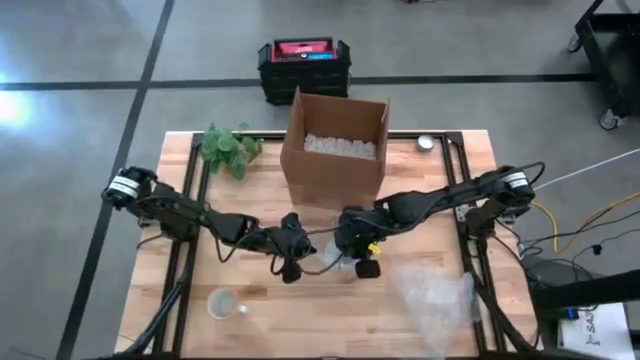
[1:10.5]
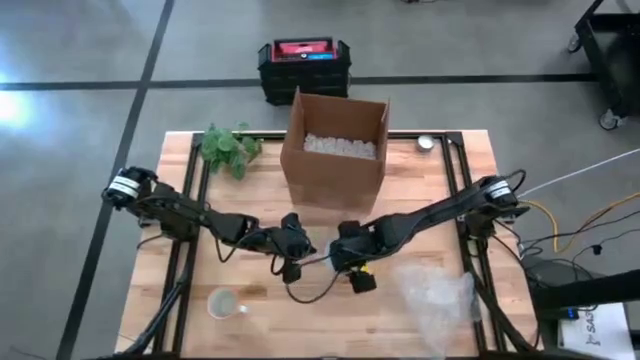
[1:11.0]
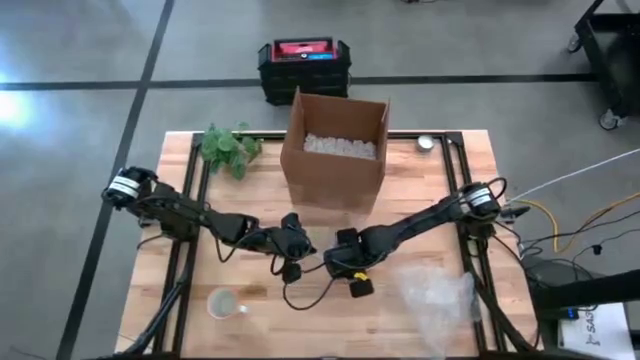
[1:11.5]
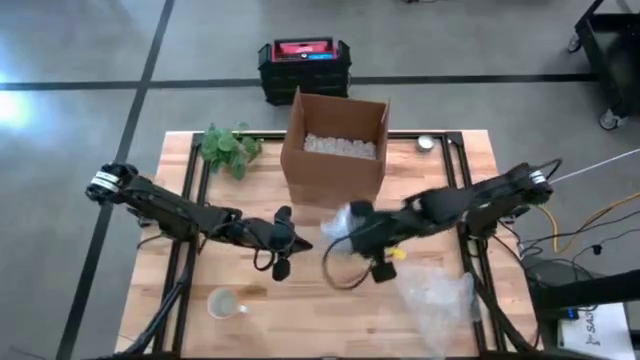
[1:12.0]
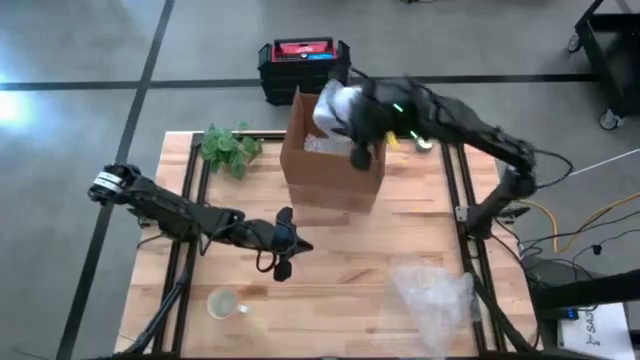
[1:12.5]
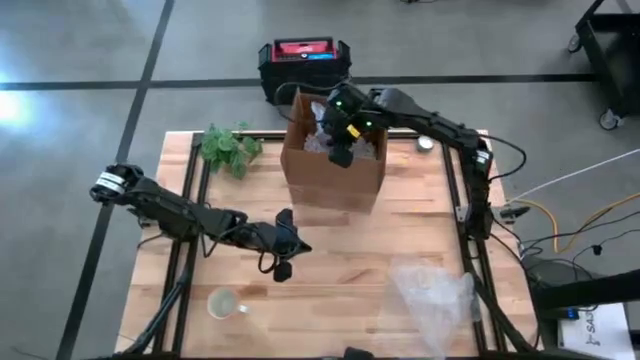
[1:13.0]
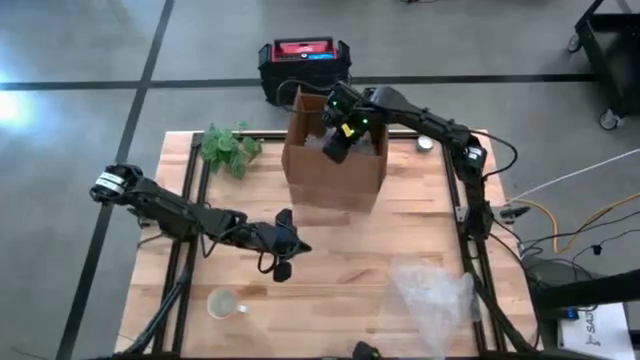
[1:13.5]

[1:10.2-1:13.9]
Task: wrap mug
Put the wrapped blue cup into the cardboard box

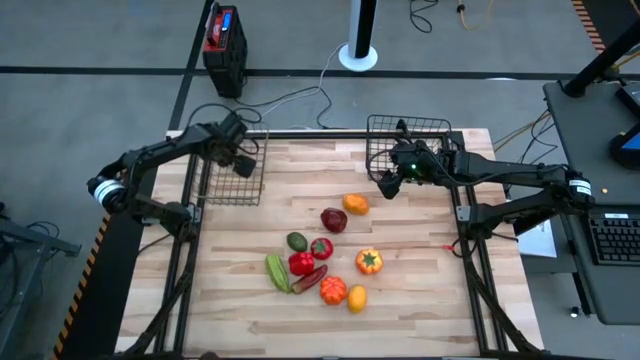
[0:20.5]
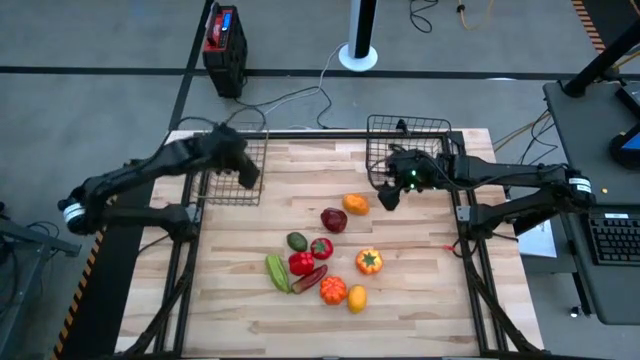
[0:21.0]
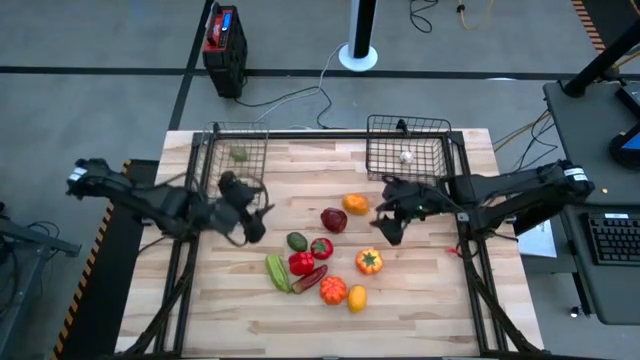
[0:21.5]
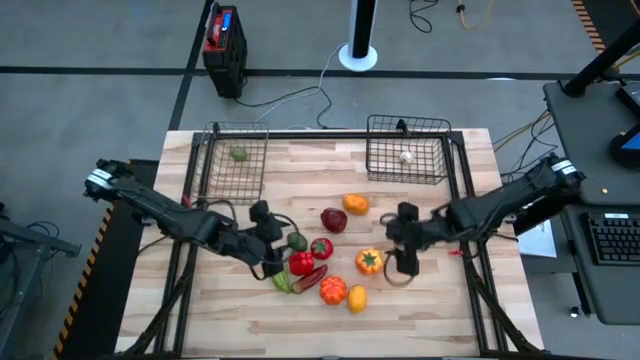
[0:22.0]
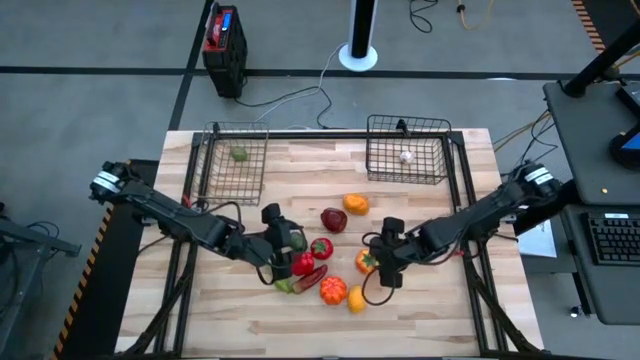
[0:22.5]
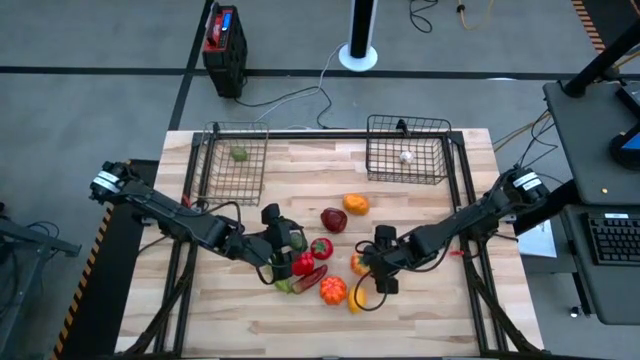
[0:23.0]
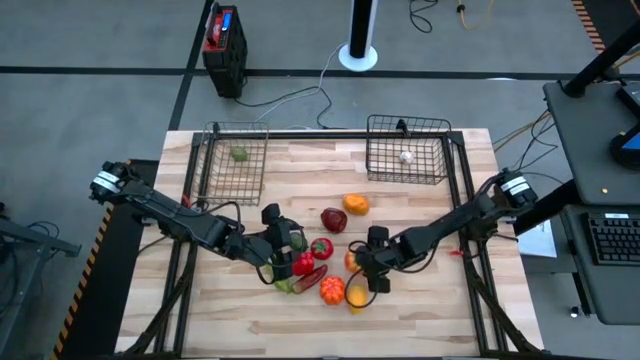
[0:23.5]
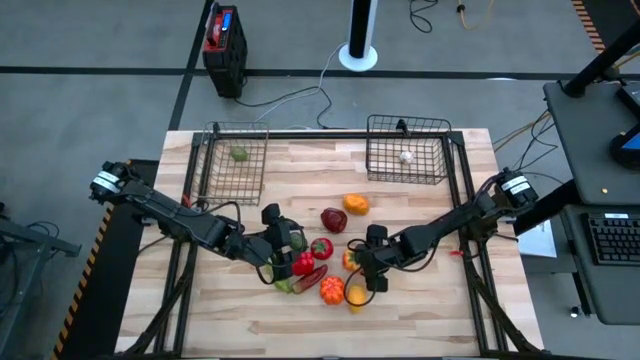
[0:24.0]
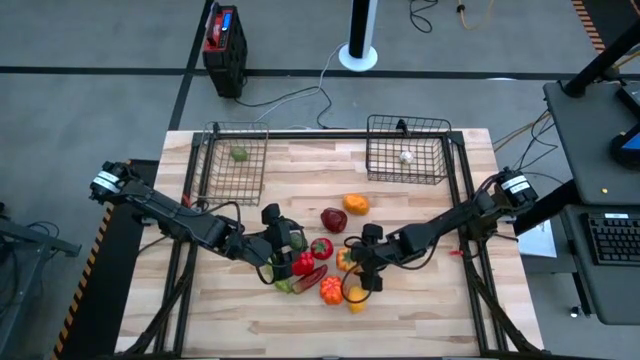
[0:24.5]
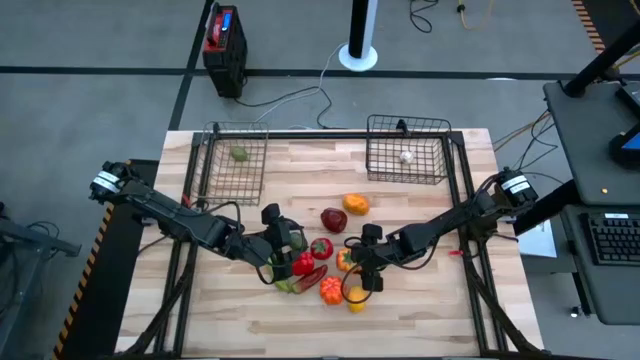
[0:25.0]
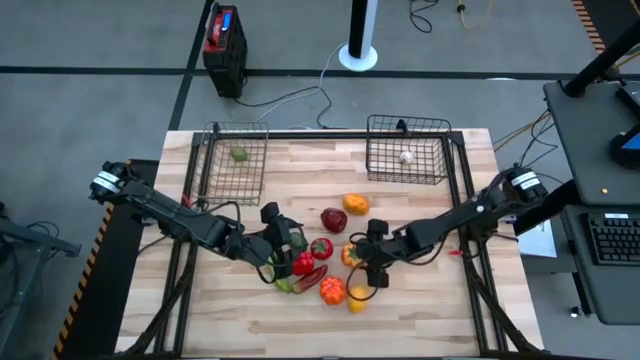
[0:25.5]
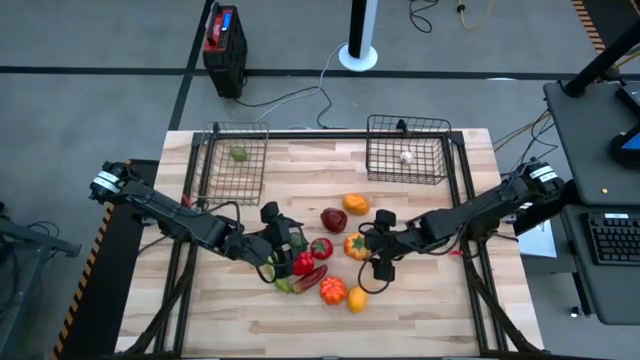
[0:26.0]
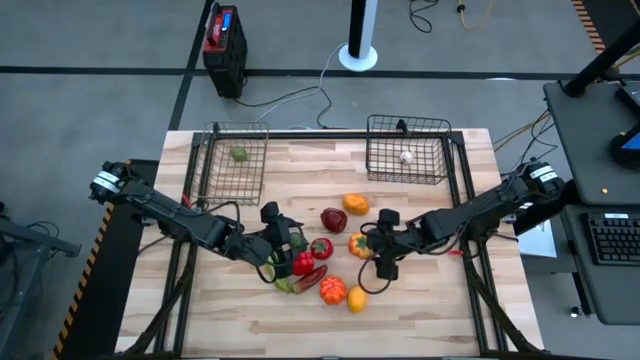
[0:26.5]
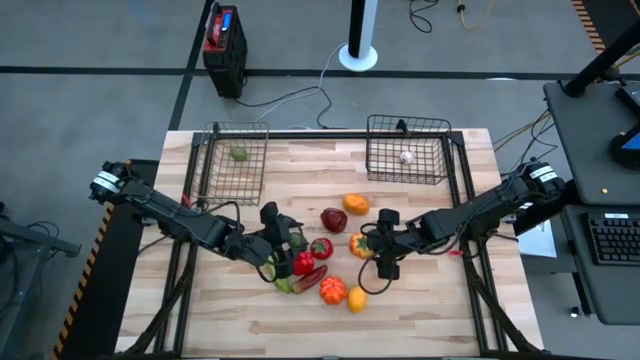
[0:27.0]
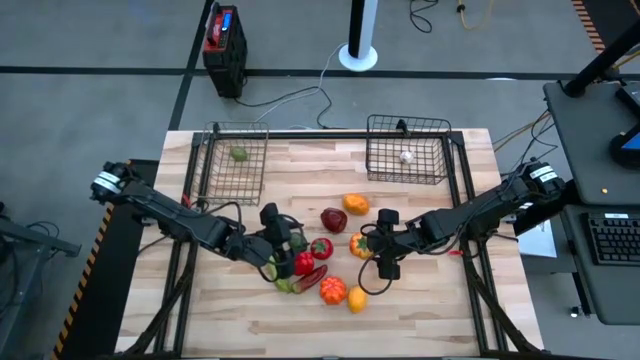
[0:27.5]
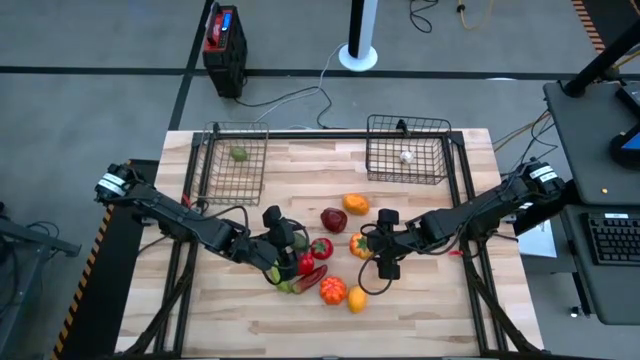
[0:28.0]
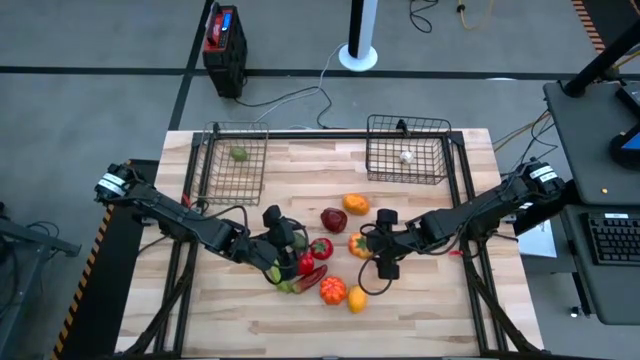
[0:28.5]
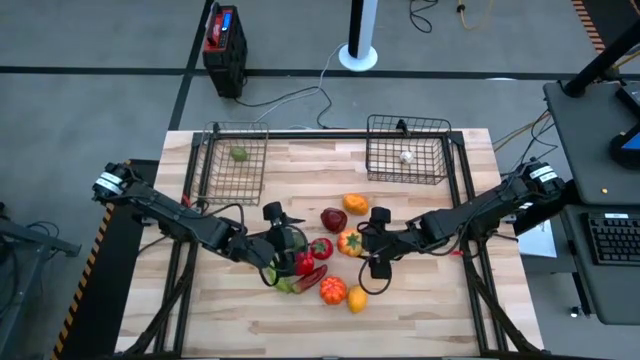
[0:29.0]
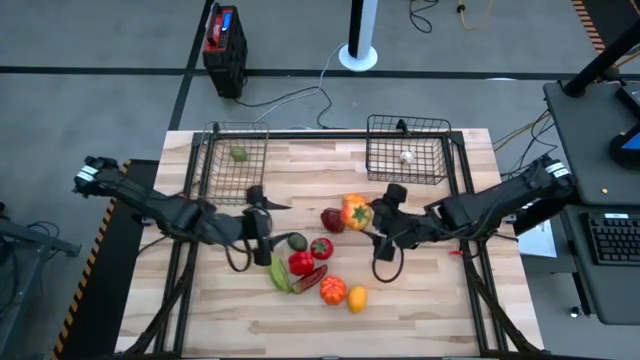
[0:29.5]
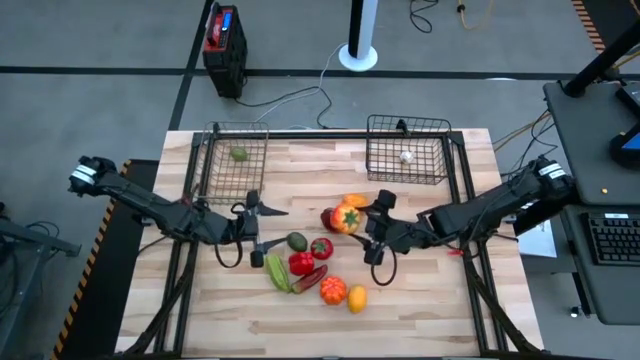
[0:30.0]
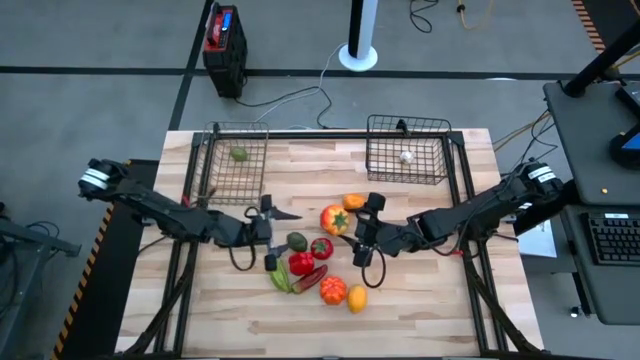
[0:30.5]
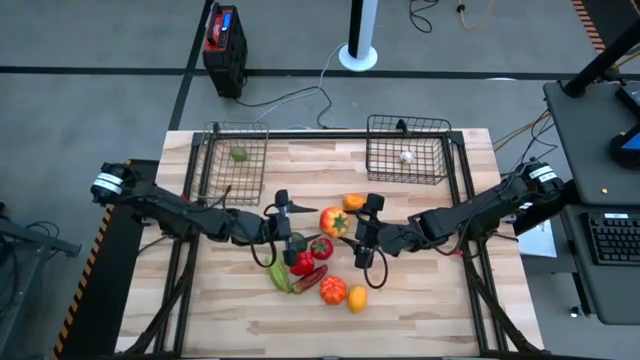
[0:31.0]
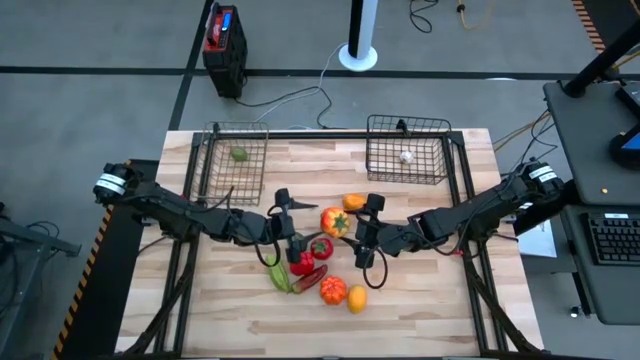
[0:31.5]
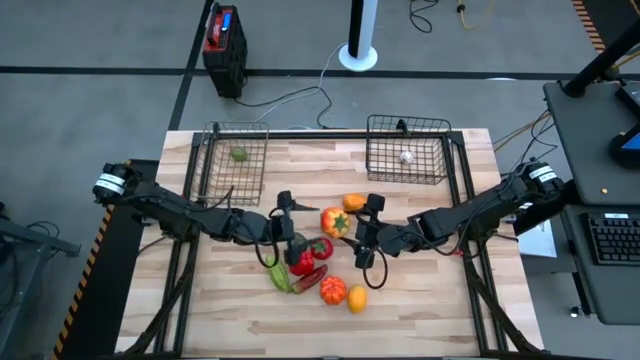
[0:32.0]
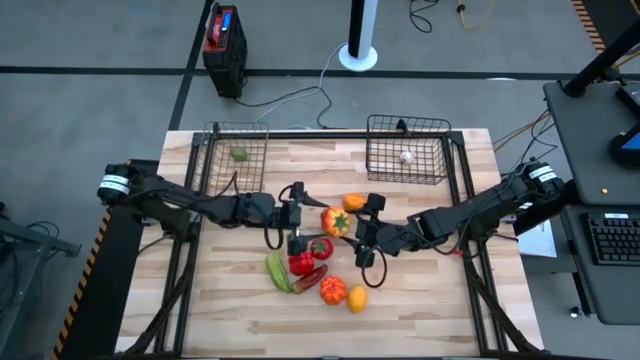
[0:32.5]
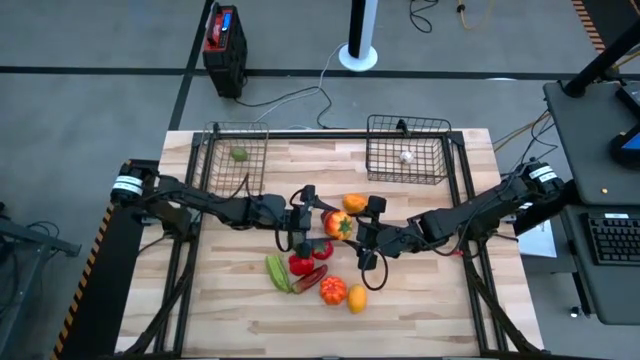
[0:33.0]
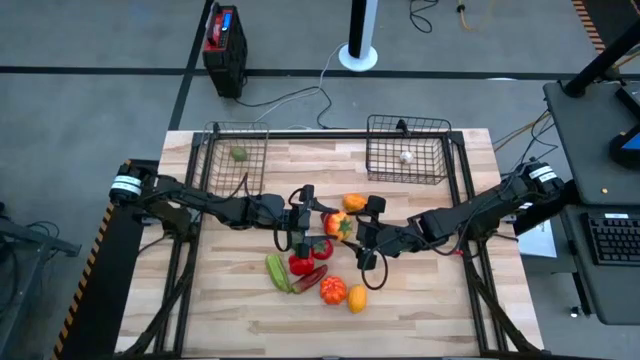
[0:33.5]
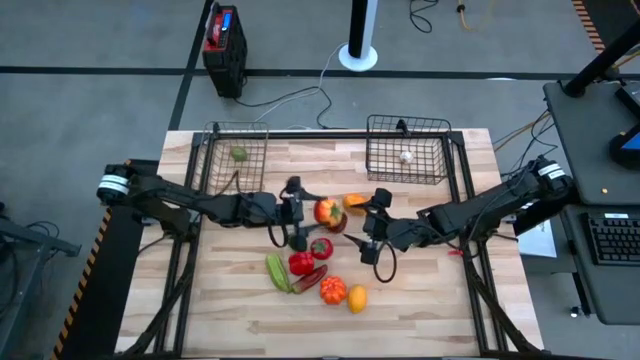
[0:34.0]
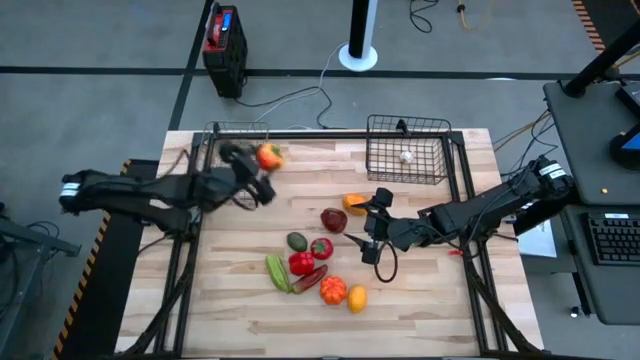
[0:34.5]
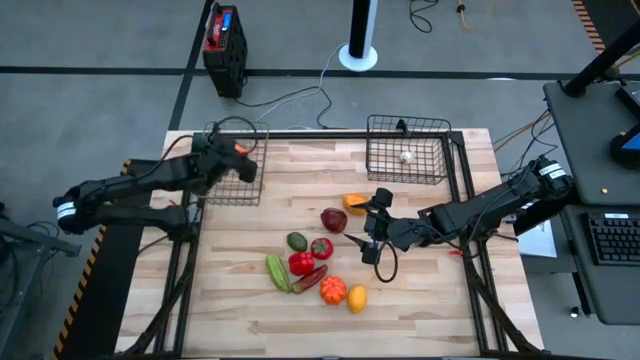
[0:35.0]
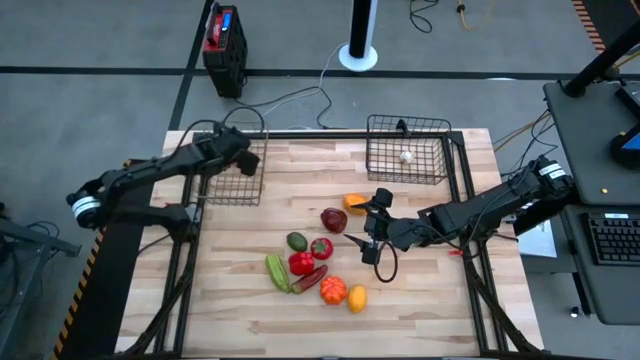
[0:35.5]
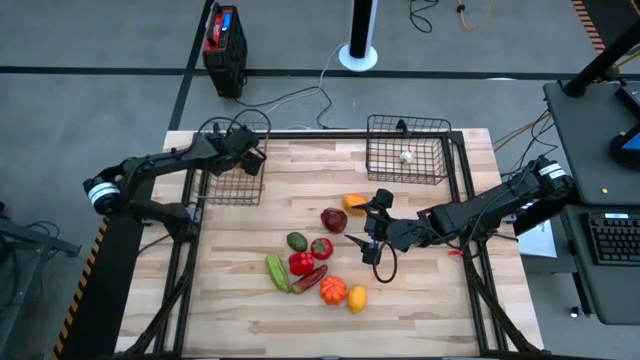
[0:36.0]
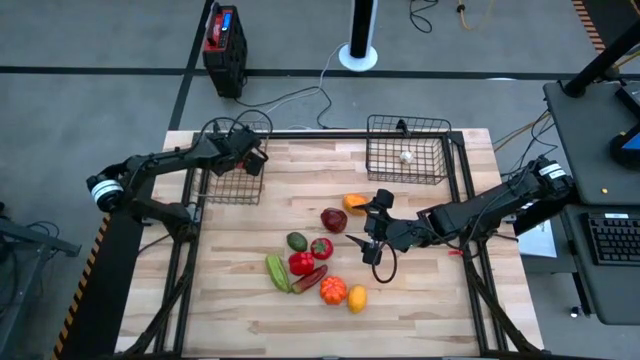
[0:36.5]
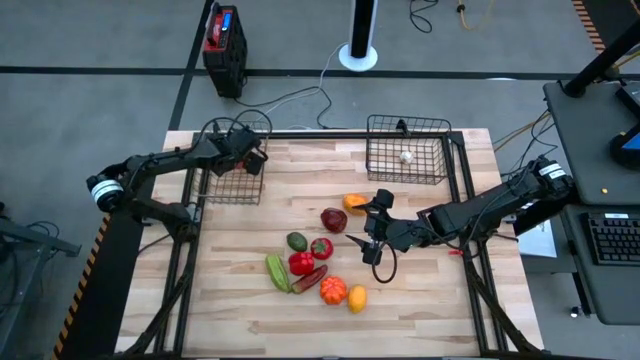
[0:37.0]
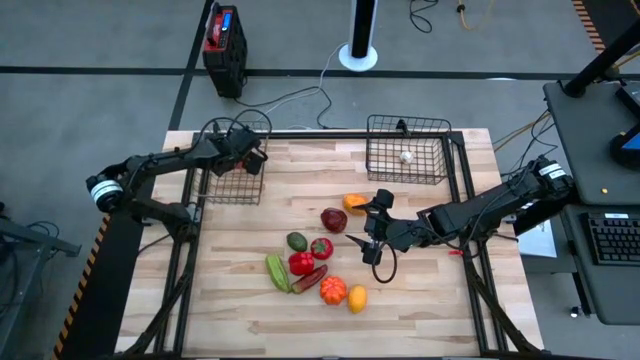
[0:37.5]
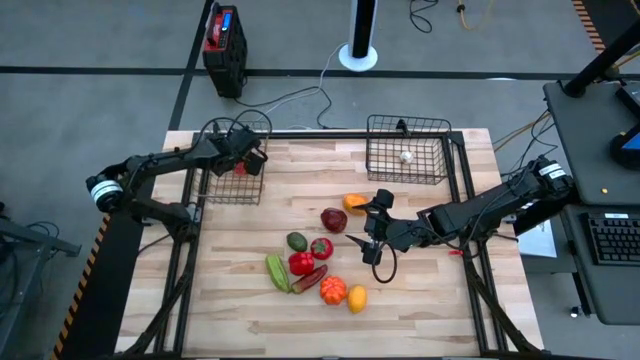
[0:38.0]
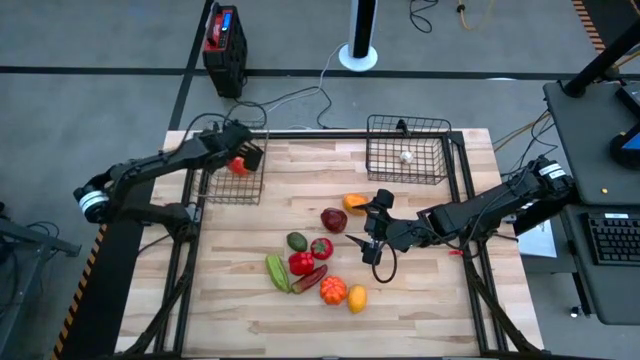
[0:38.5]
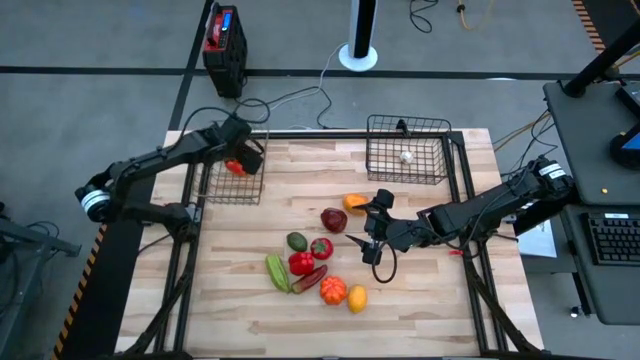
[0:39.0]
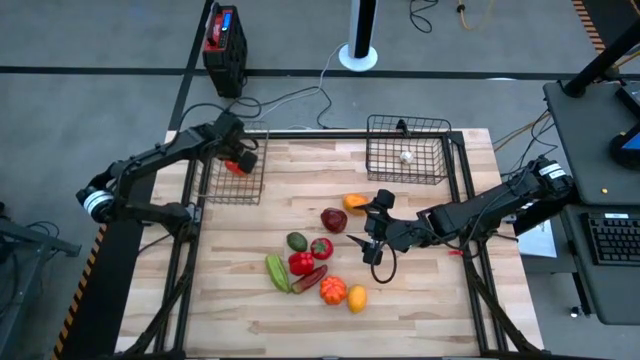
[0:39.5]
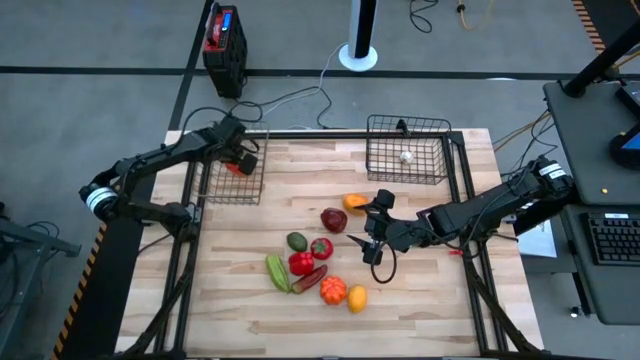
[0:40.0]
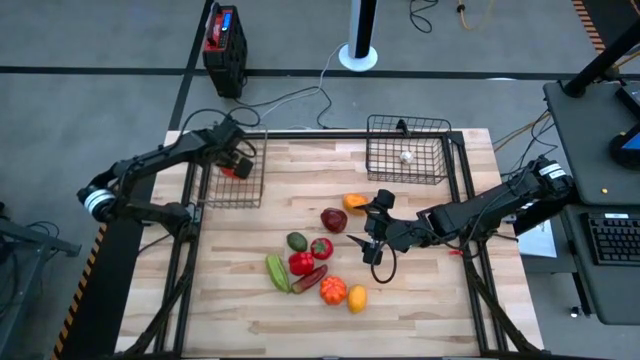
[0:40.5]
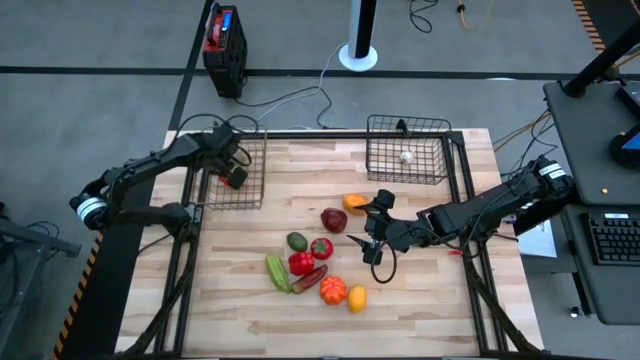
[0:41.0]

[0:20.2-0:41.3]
Task: Sort produce into baskets
Put the orange tomato into the brown wire basket
